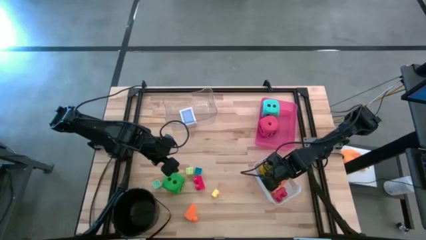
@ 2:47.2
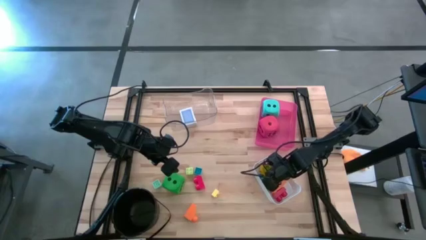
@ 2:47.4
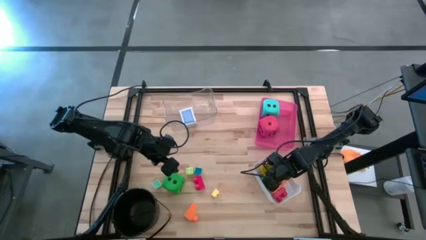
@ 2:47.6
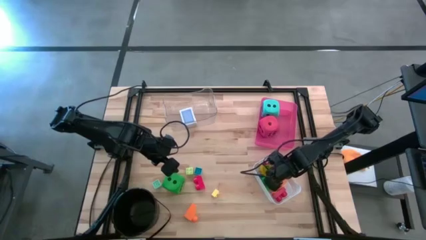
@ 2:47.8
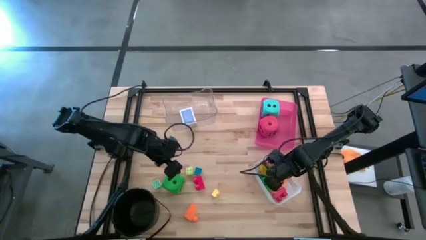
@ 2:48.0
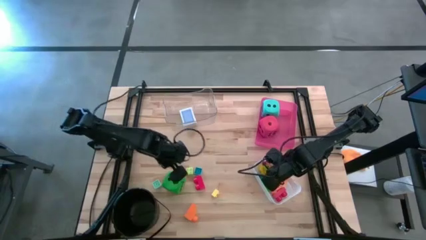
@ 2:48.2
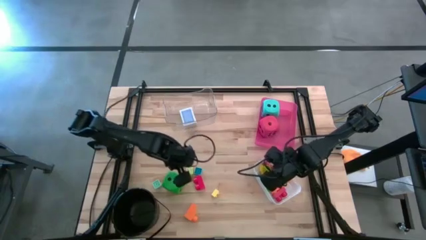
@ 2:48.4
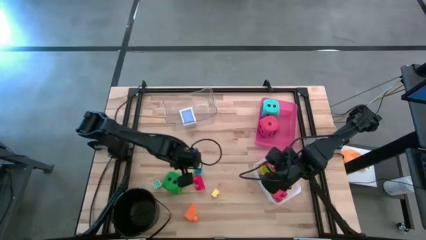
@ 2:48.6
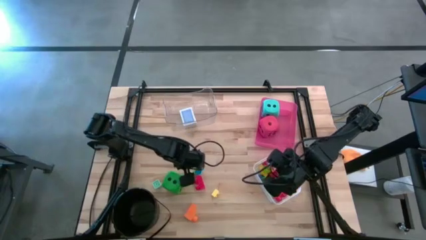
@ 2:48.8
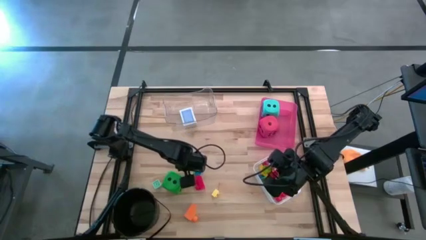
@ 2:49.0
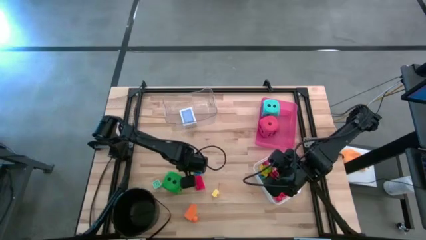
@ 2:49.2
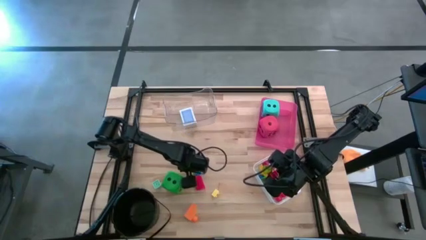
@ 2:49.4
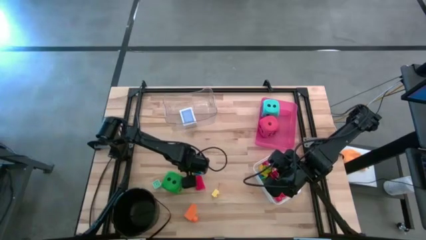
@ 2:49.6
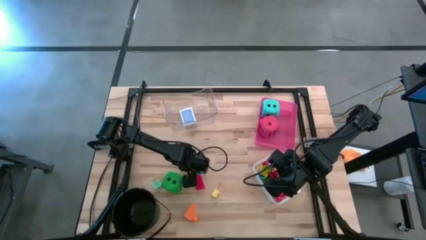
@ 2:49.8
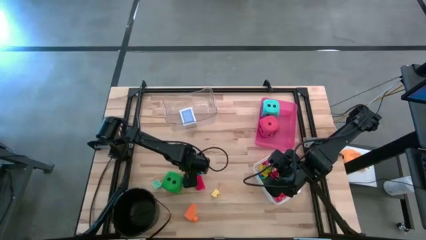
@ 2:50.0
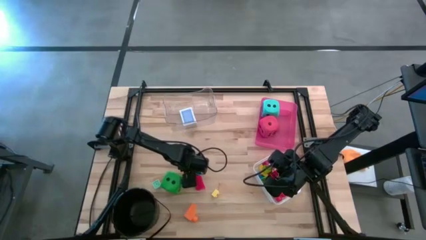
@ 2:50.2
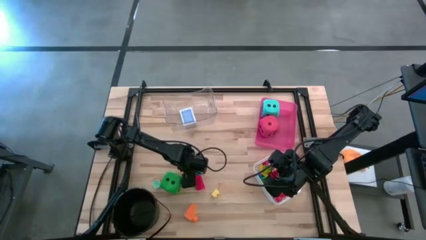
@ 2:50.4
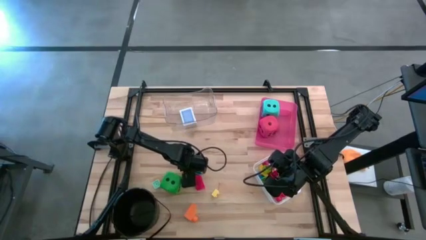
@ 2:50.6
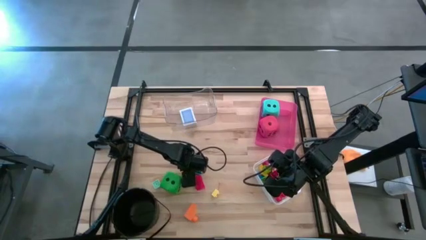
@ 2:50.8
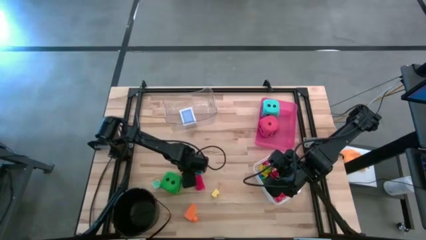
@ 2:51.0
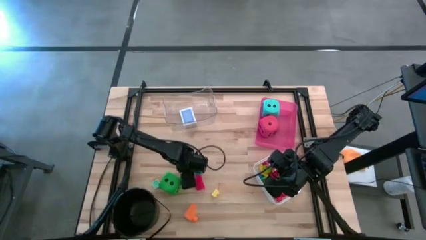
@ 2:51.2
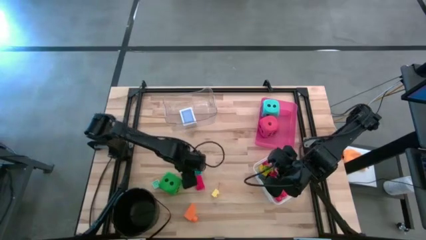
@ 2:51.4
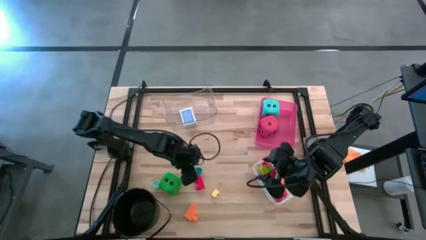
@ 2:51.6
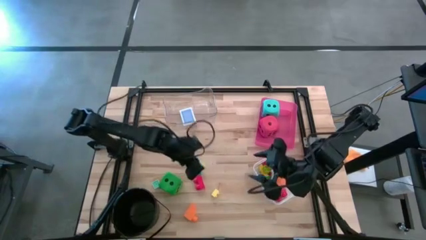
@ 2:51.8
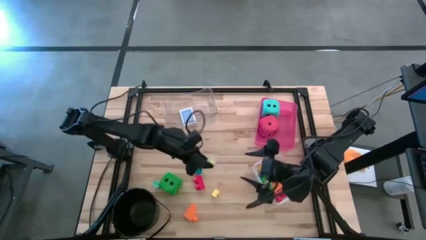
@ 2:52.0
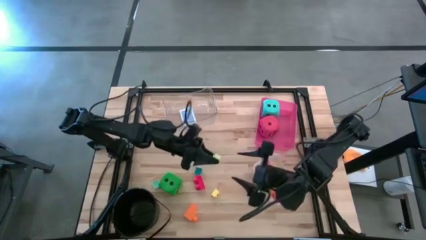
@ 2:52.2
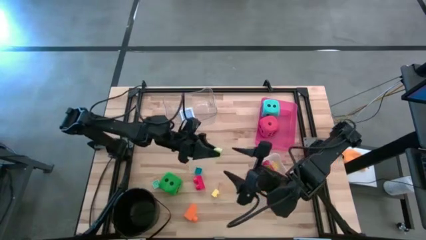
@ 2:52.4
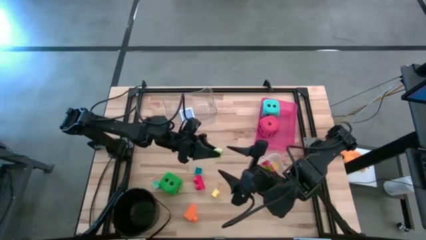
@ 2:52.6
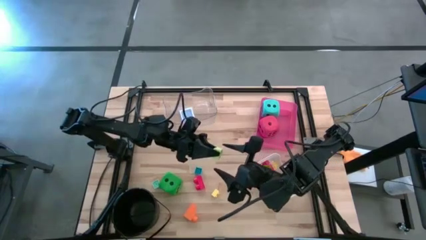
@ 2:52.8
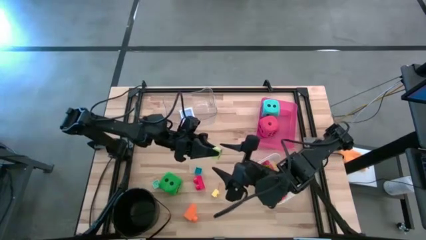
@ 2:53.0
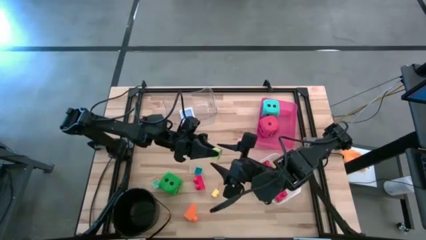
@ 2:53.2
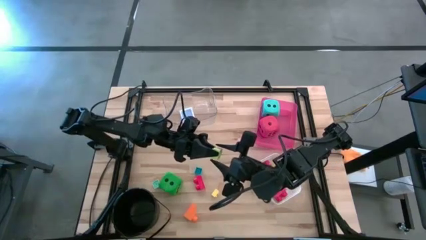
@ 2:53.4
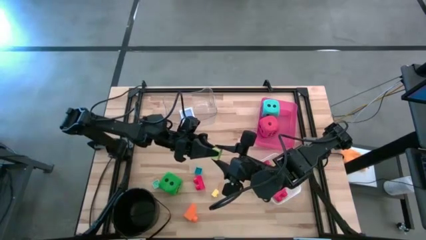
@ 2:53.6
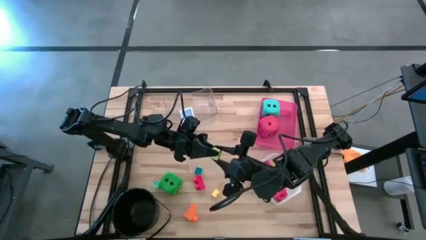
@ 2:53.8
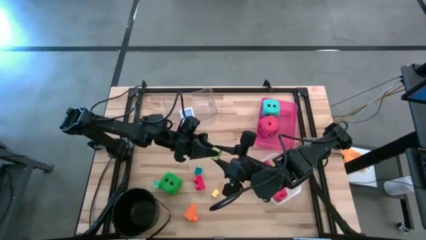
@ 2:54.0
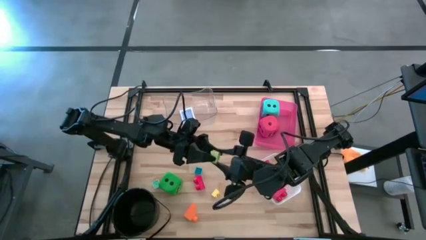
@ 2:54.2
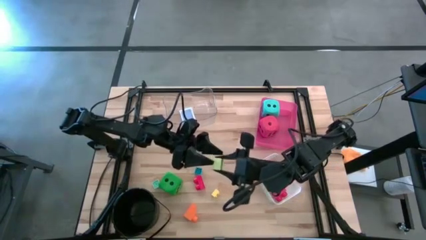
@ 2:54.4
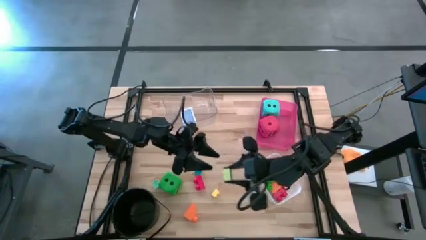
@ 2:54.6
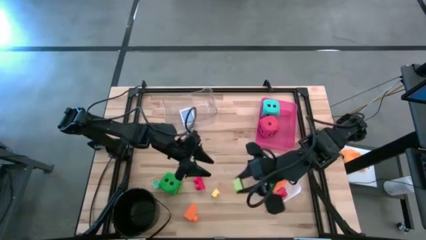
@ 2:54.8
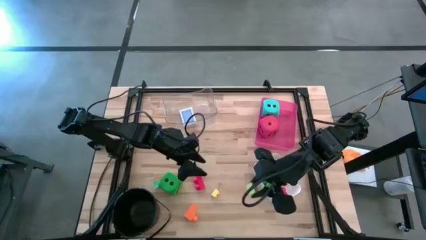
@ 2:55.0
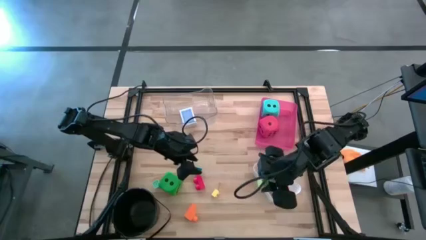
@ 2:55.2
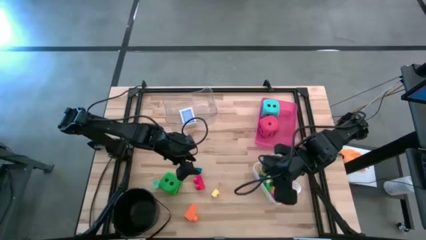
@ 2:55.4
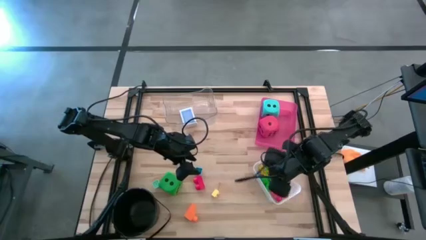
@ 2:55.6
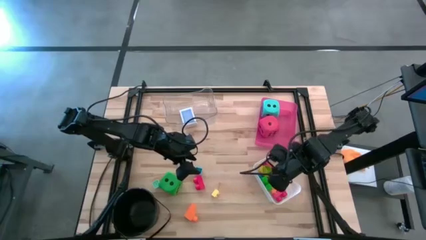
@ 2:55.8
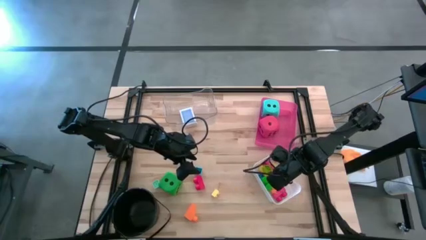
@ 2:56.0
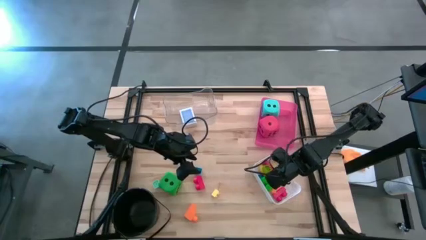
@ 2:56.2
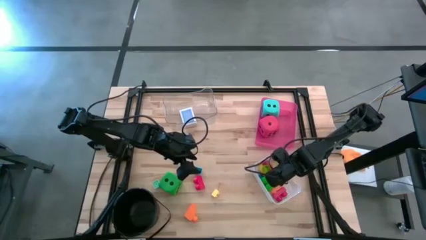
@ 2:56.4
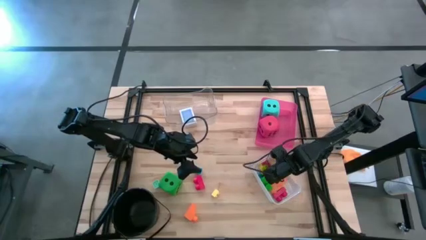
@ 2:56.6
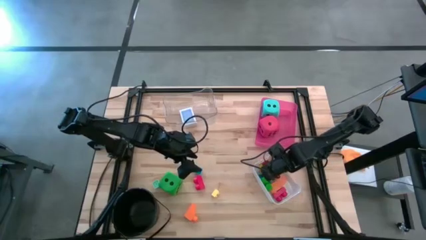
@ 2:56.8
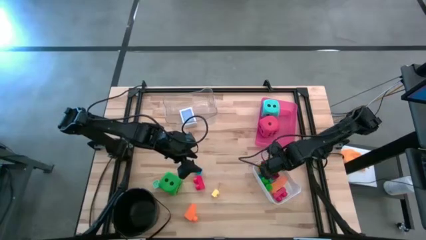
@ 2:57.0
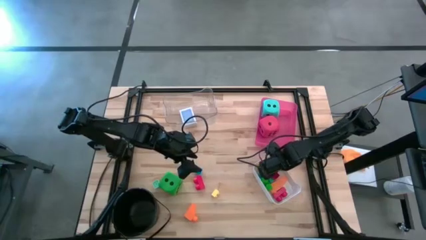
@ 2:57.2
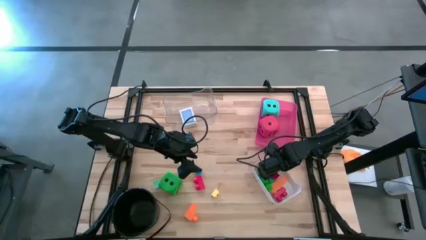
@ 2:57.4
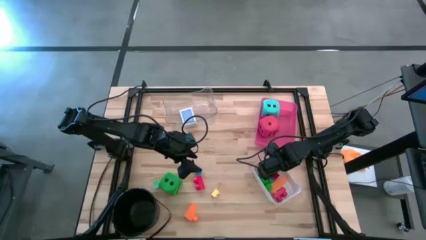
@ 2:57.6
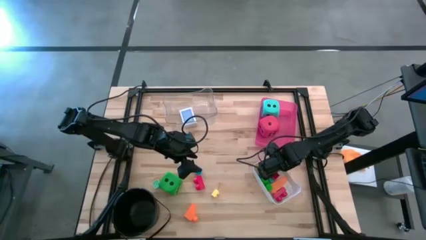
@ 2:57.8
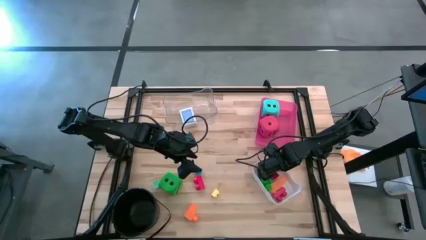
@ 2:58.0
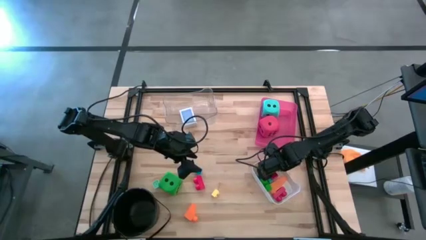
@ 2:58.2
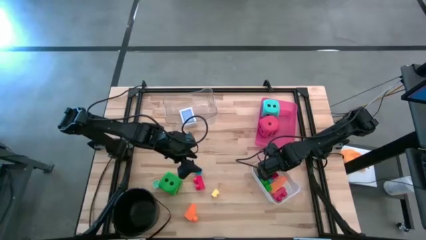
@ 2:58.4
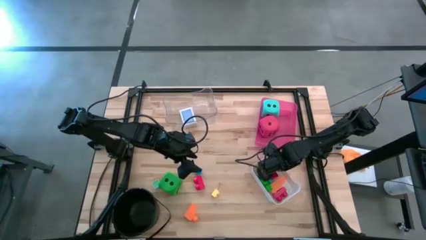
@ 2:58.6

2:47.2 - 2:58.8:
Task: Pick & Place Toys
Put the light green game piece into the white bin

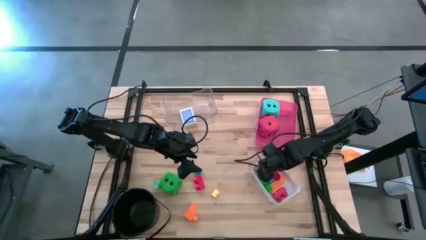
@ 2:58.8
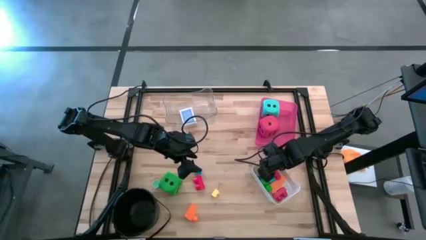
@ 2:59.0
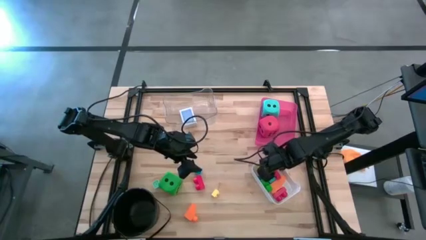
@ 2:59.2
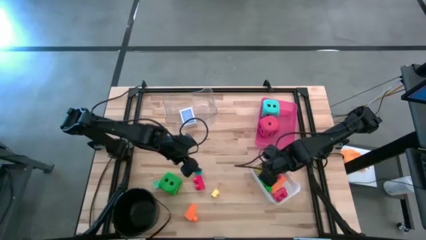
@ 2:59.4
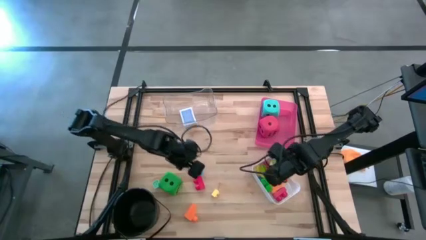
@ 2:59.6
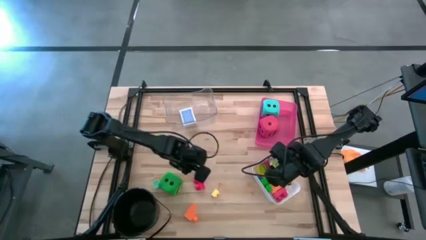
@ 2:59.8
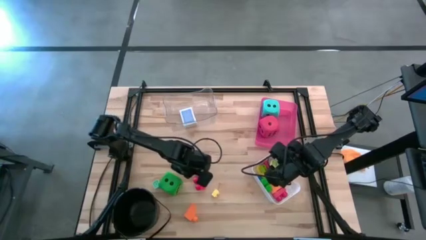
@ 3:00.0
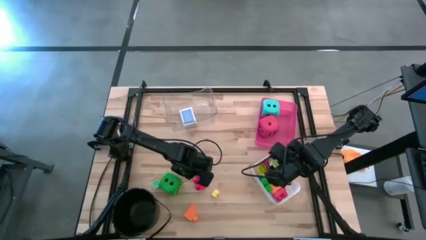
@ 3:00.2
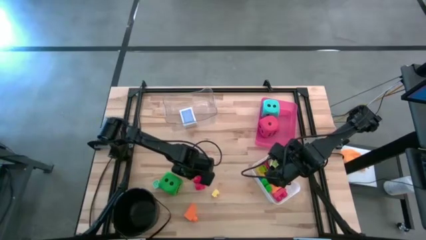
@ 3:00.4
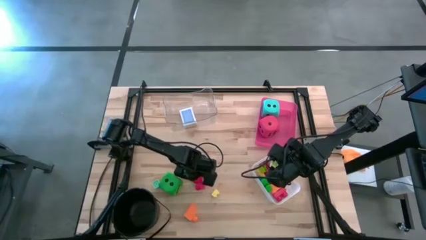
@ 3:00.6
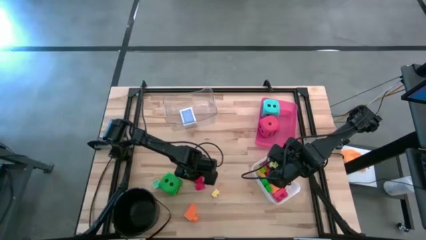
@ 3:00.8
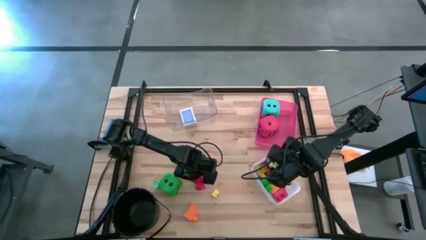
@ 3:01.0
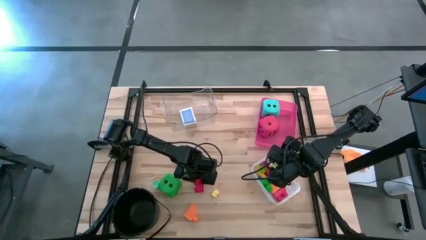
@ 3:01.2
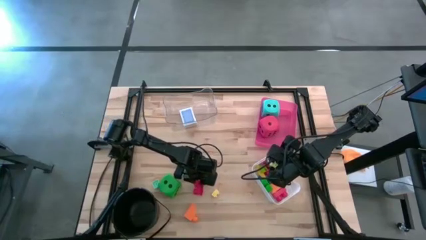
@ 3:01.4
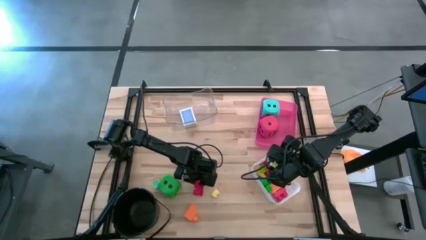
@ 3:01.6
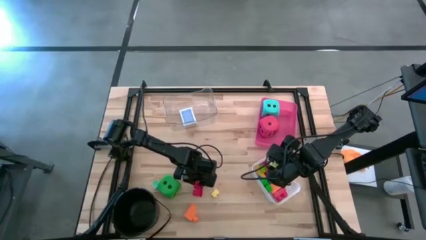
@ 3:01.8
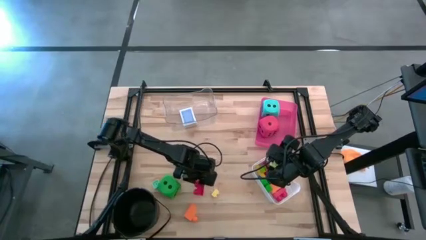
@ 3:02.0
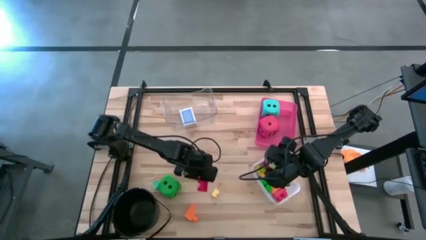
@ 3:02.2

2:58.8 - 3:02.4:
Put the red game piece into the white bin
